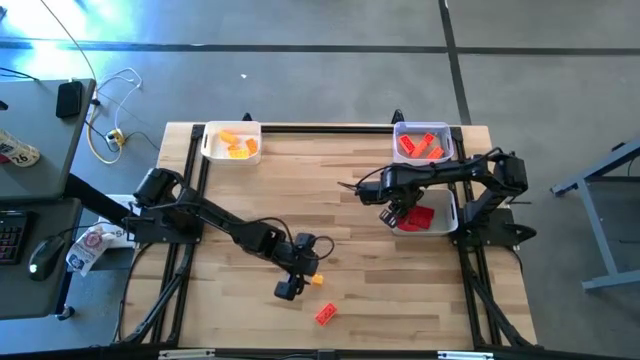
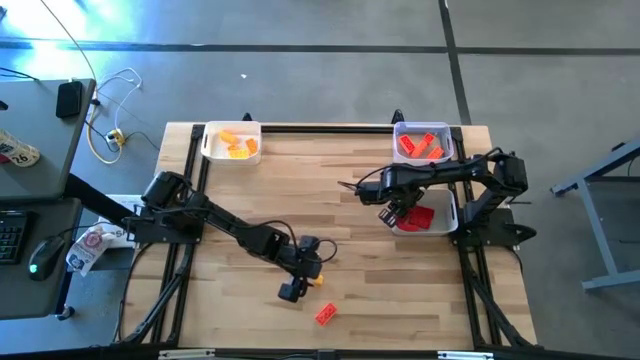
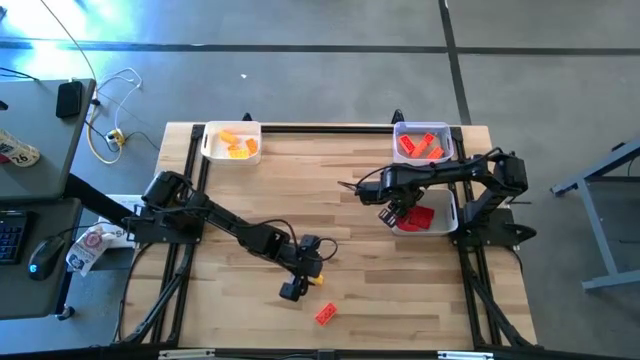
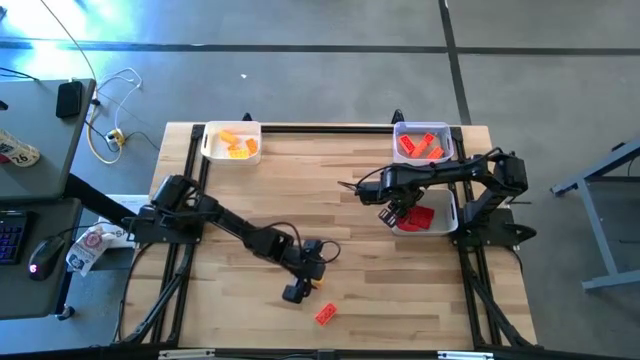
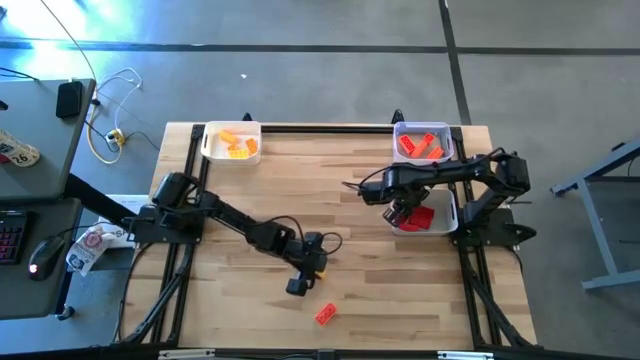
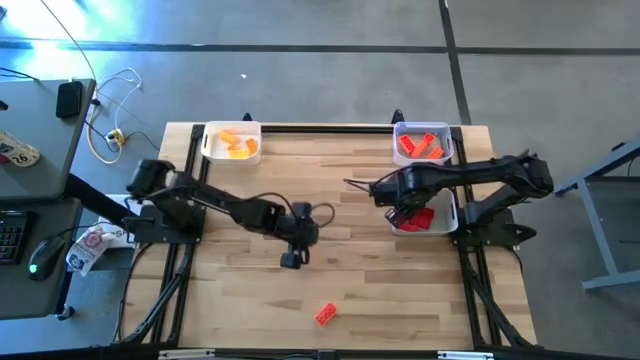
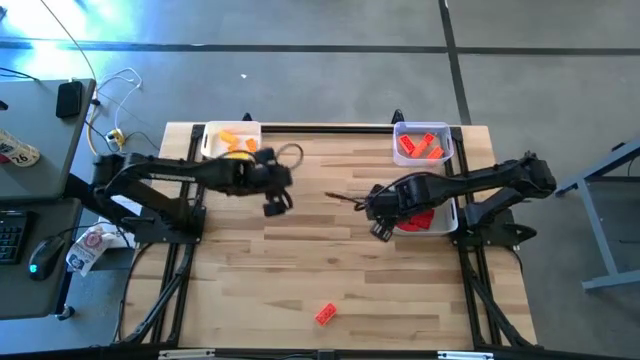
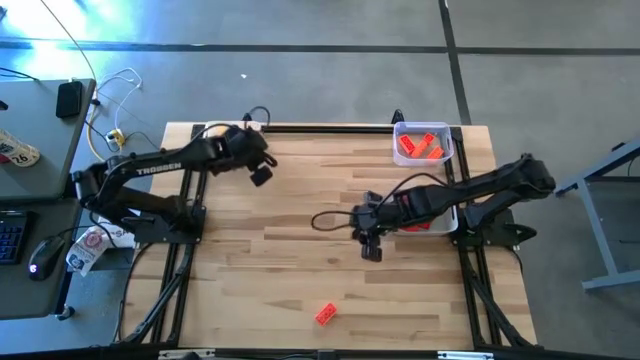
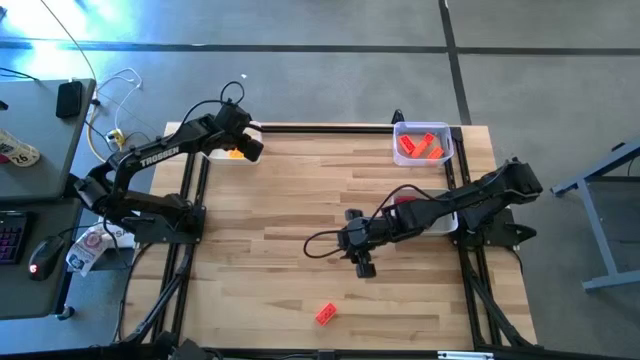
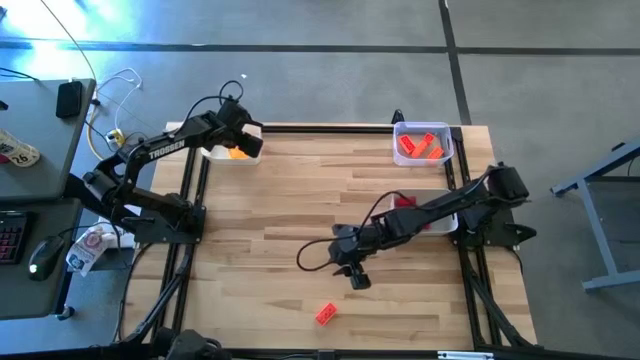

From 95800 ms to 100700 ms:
Task: Sort & place blocks by color
Put the yellow game piece into the white bin

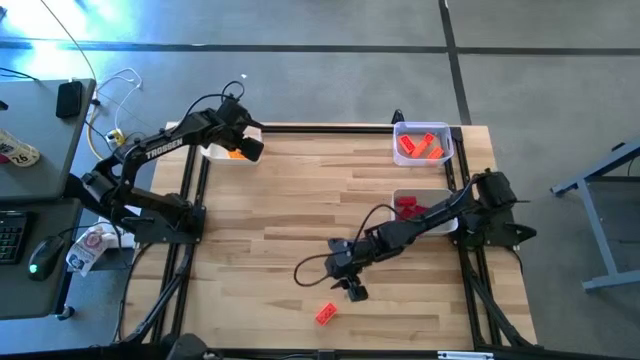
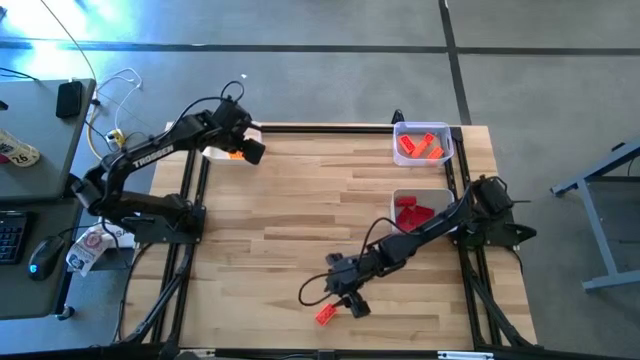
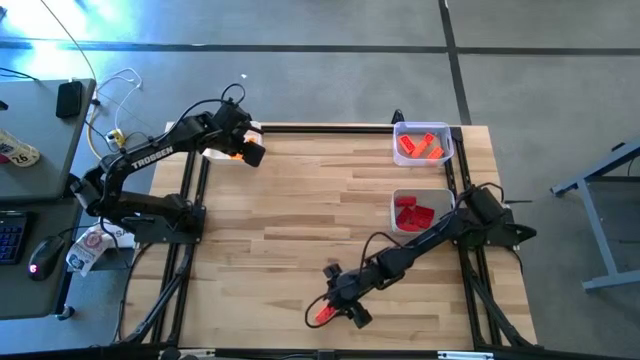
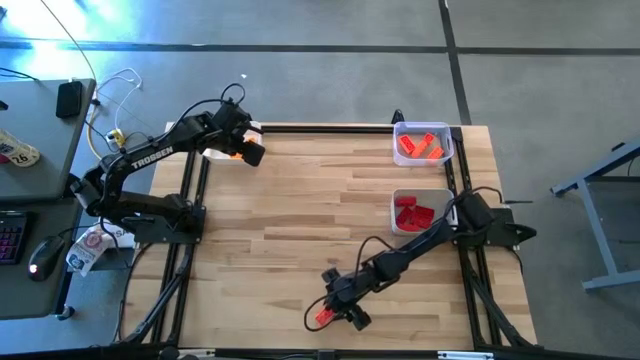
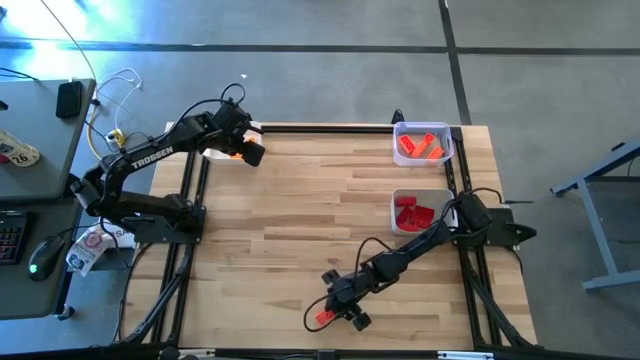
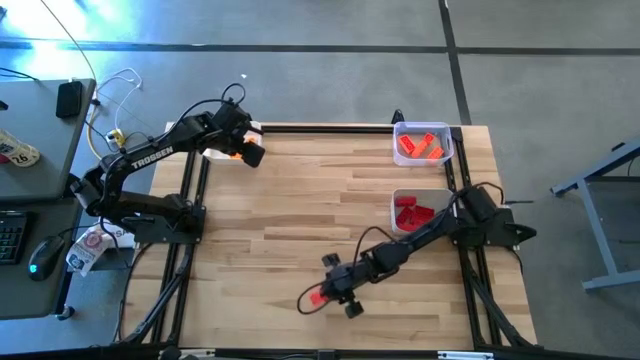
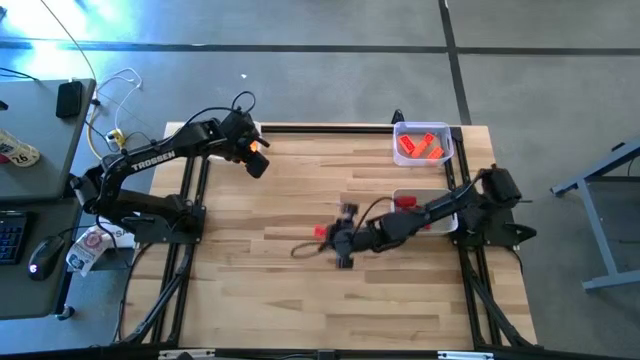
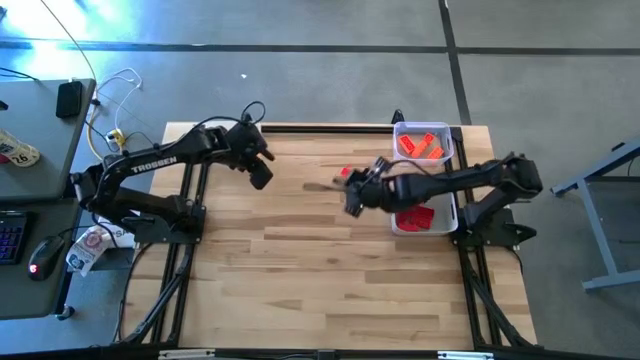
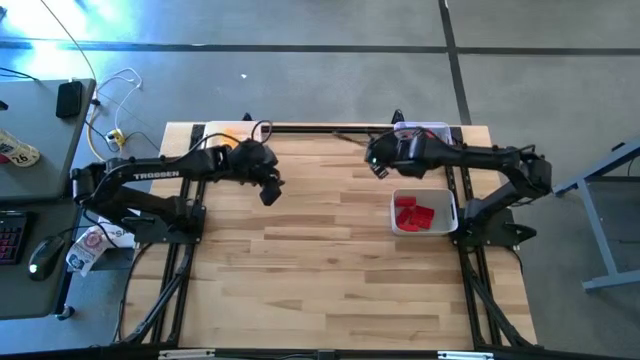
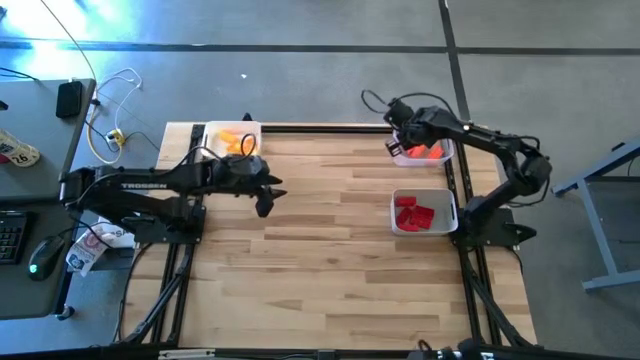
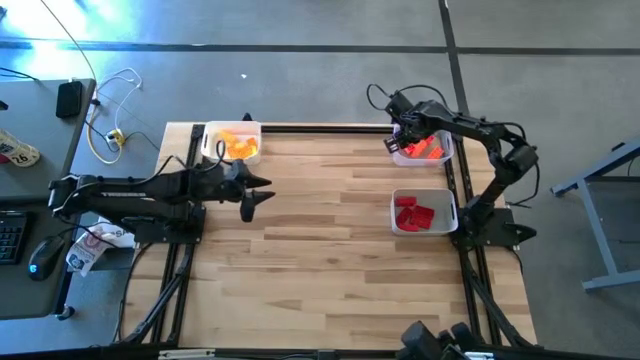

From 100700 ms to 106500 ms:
Put the orange game piece into the transparent bin

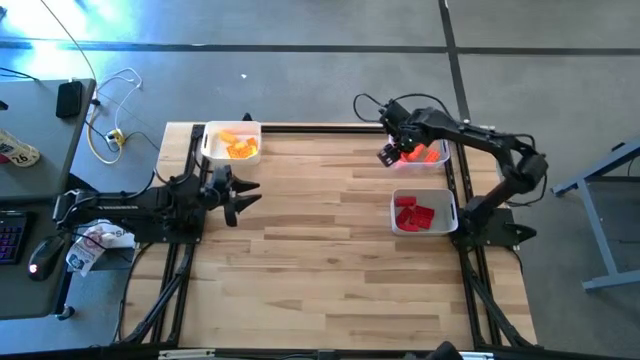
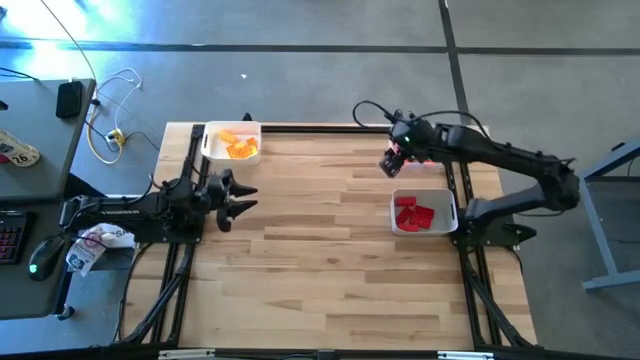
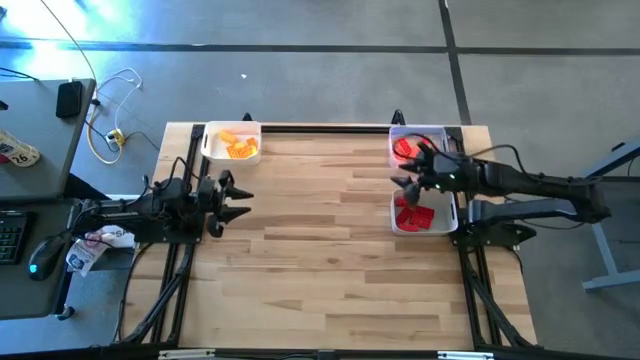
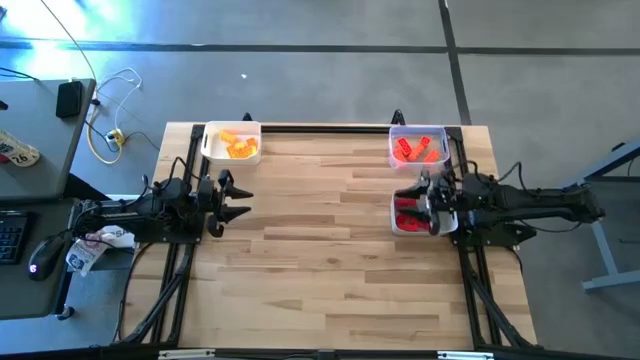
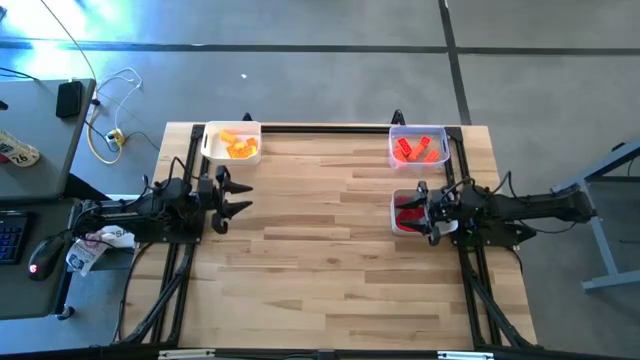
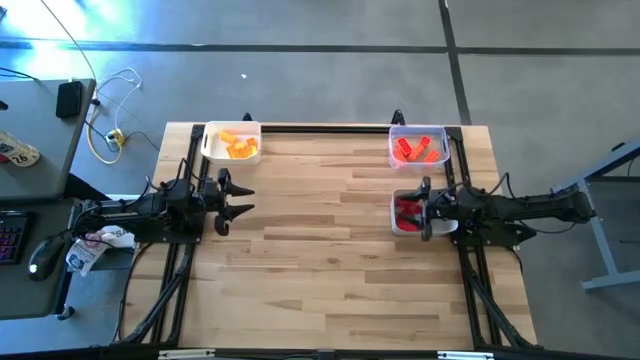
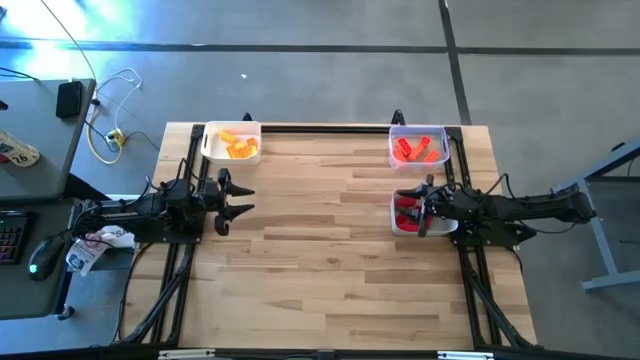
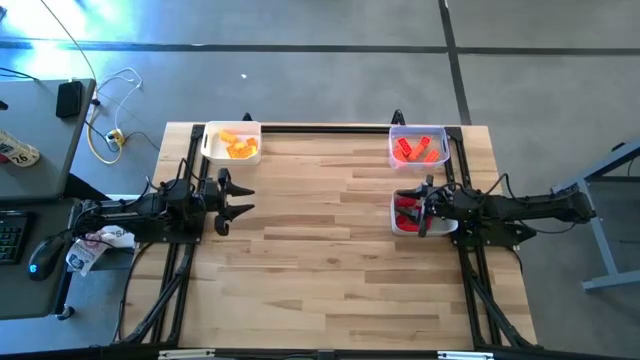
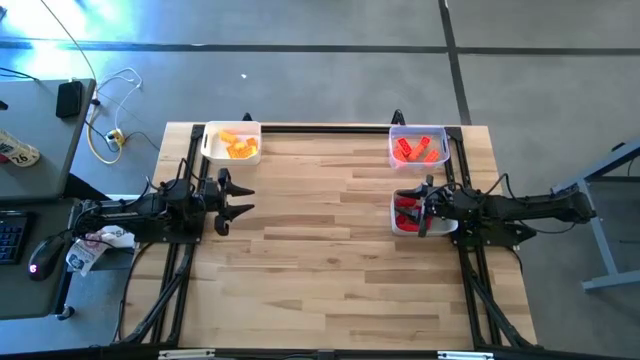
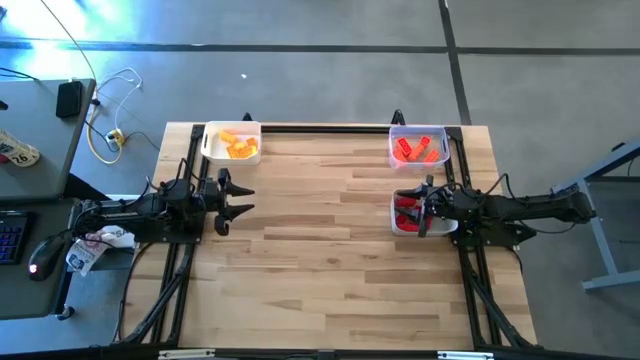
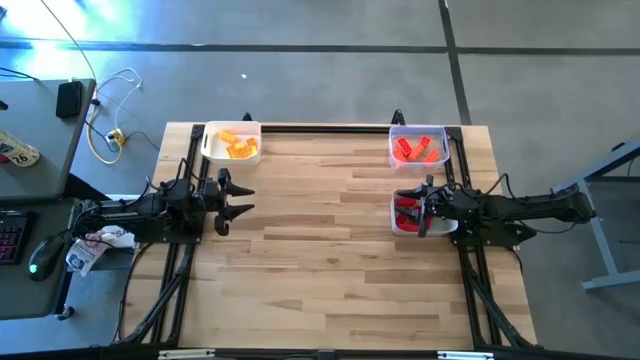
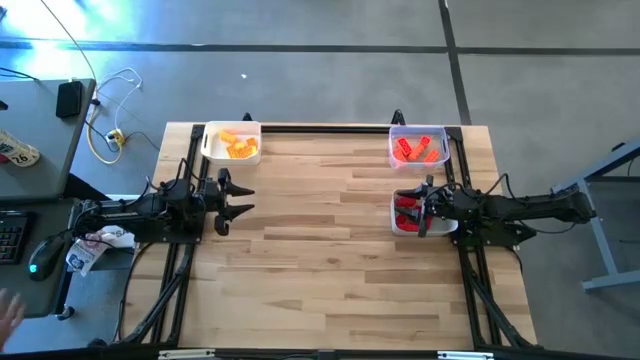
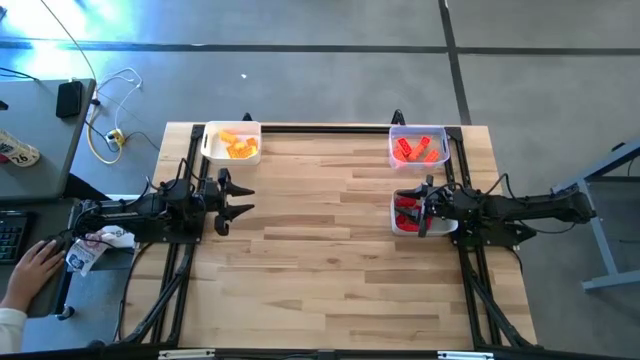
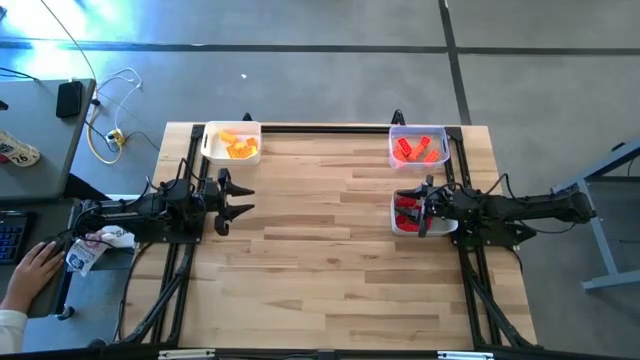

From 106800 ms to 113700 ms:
Return to Home Position

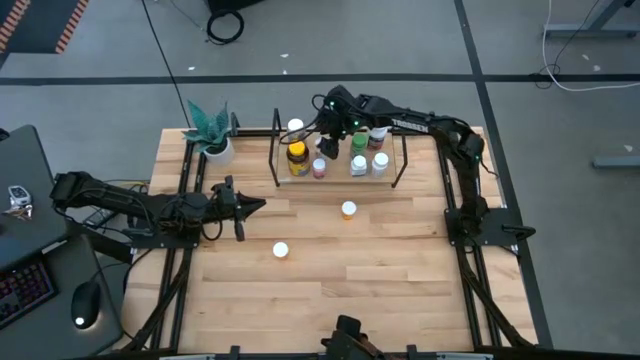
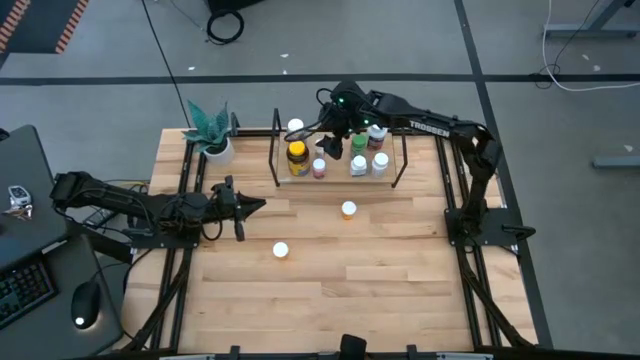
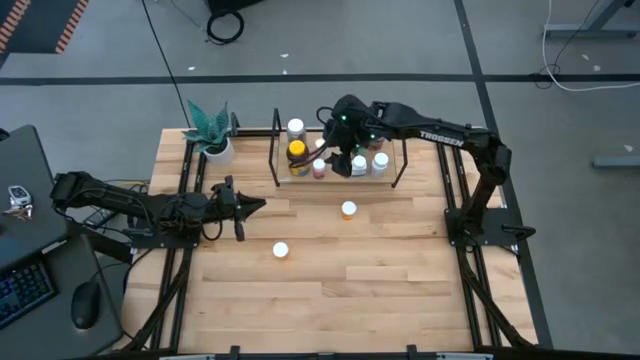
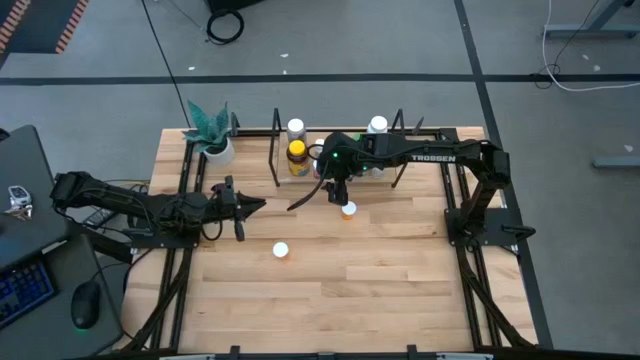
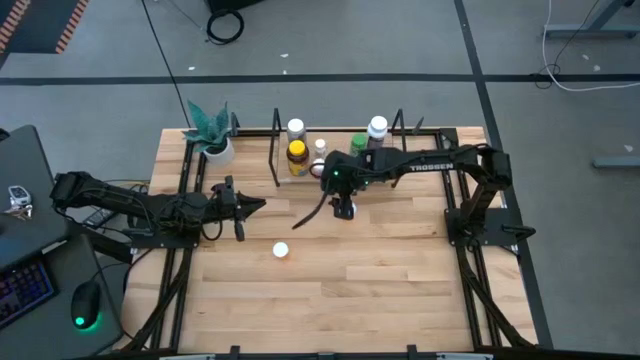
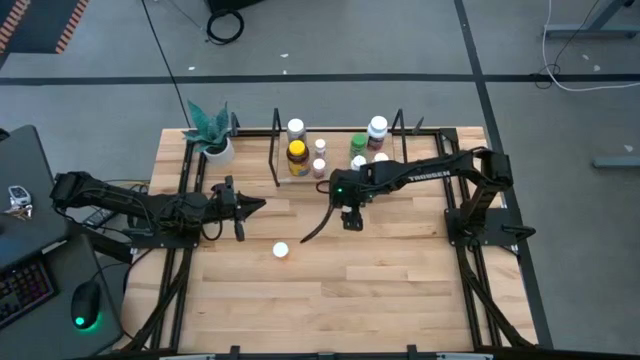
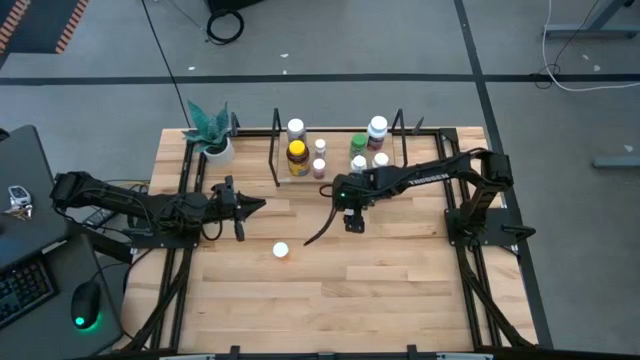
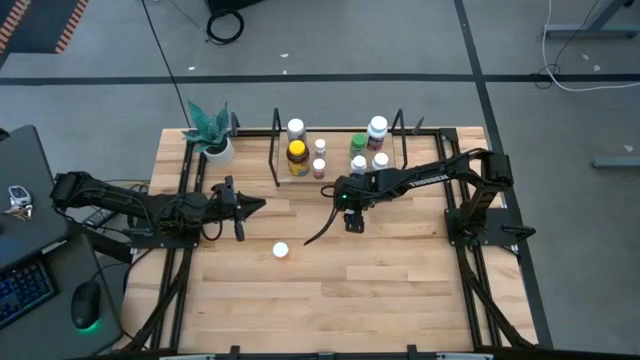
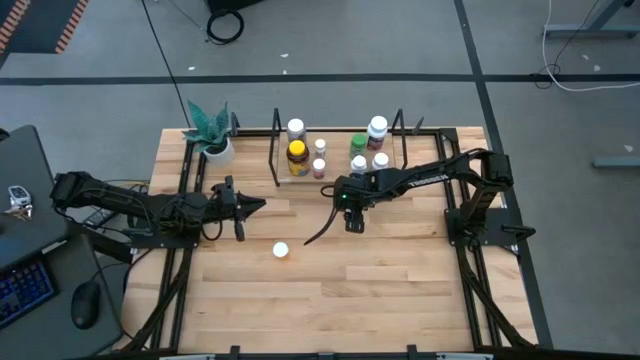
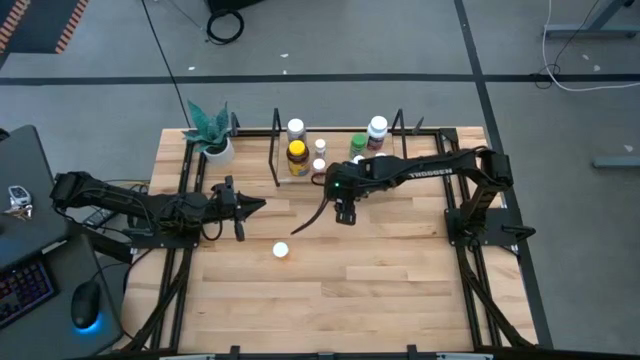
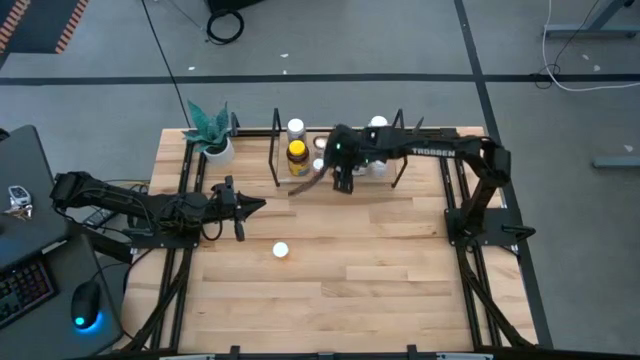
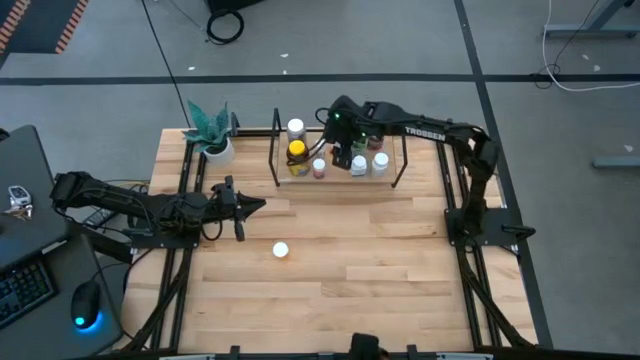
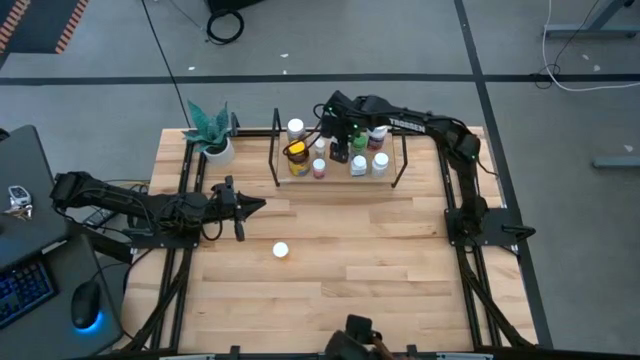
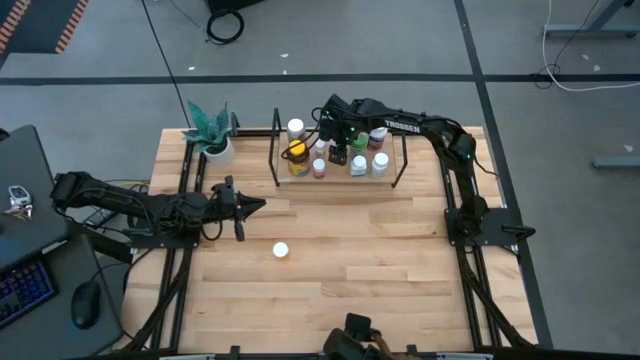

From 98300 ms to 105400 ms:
Task: Pick and place medicine bottles onto shelf by color
Put the top orange medicine bottle on the shelf
